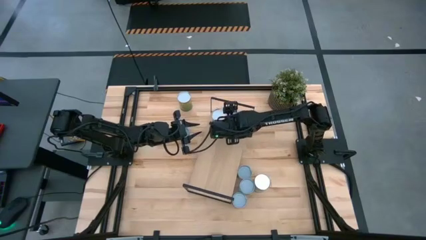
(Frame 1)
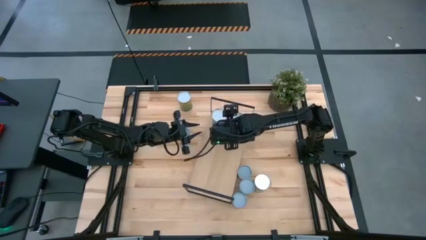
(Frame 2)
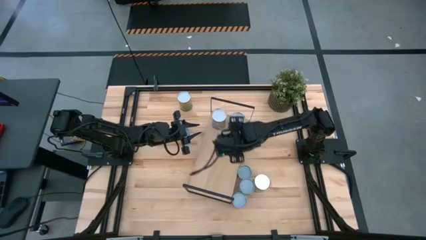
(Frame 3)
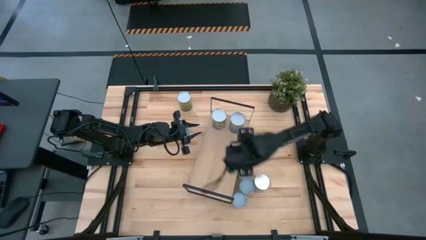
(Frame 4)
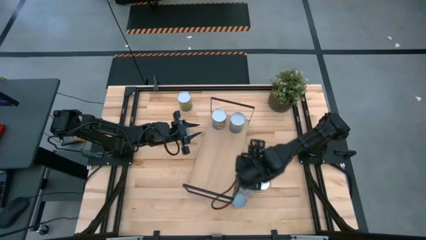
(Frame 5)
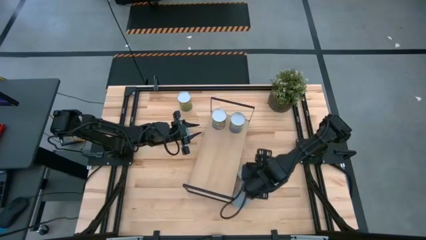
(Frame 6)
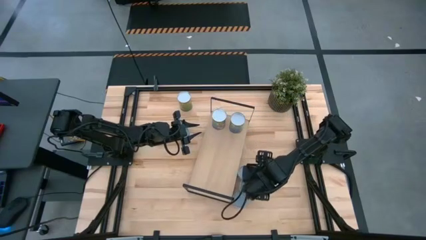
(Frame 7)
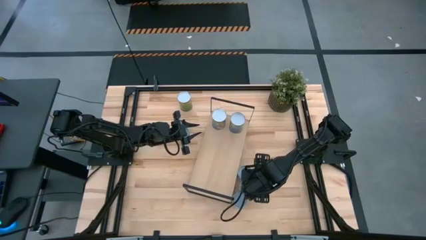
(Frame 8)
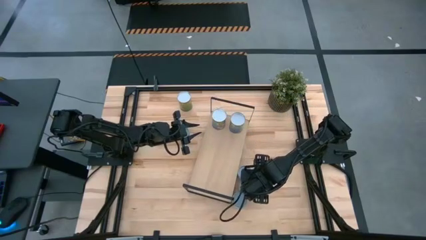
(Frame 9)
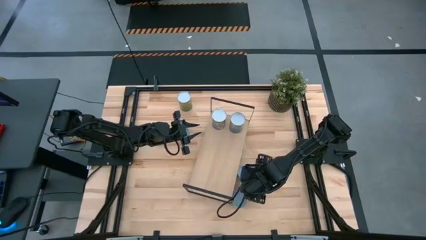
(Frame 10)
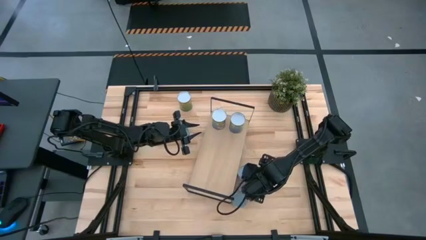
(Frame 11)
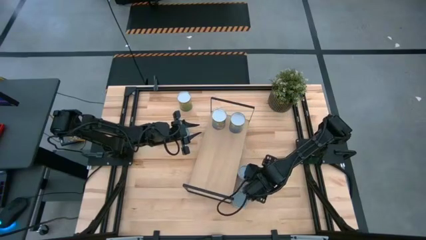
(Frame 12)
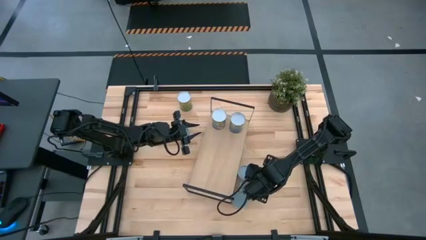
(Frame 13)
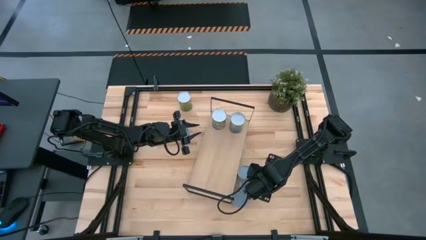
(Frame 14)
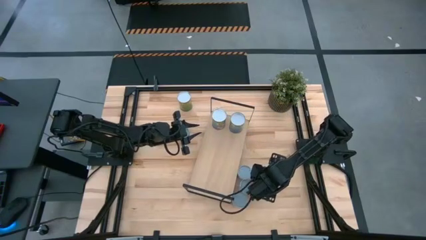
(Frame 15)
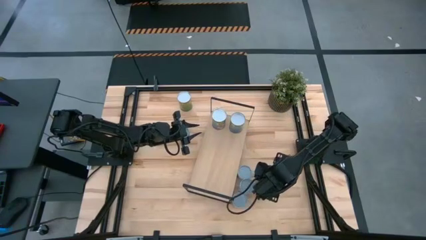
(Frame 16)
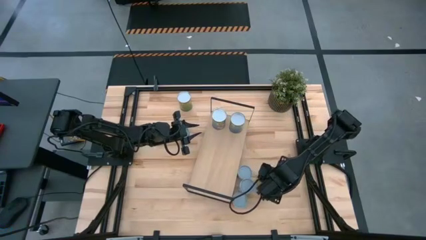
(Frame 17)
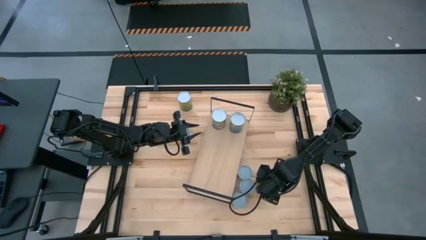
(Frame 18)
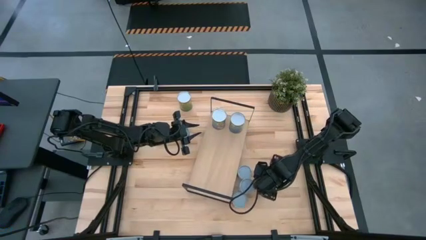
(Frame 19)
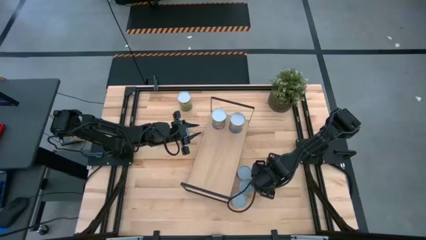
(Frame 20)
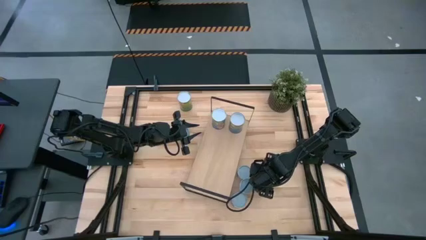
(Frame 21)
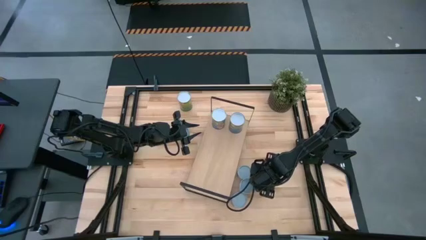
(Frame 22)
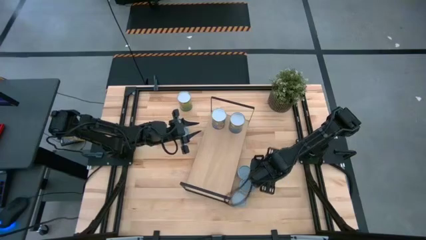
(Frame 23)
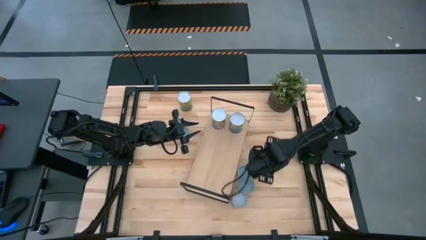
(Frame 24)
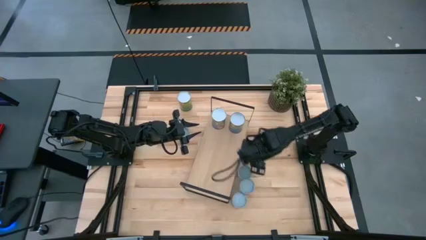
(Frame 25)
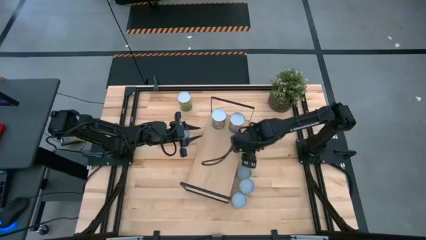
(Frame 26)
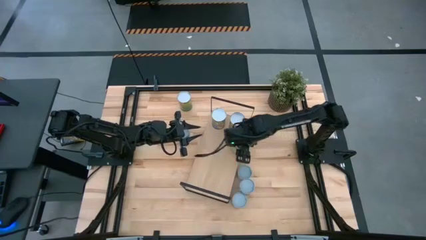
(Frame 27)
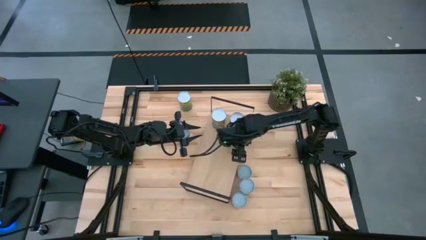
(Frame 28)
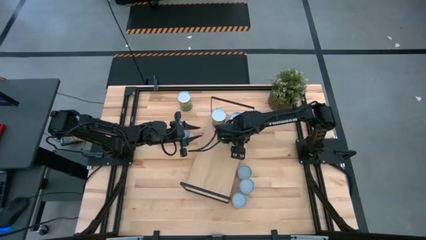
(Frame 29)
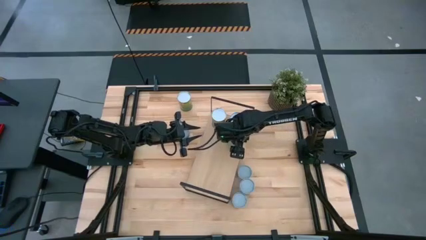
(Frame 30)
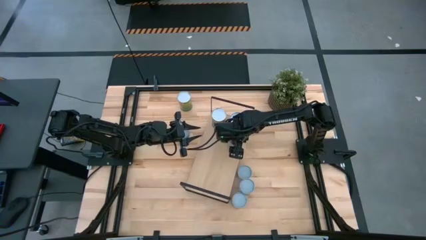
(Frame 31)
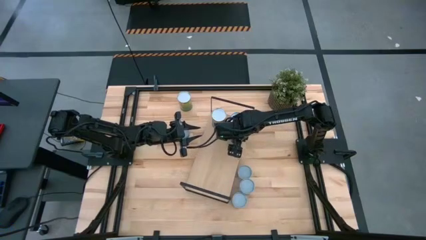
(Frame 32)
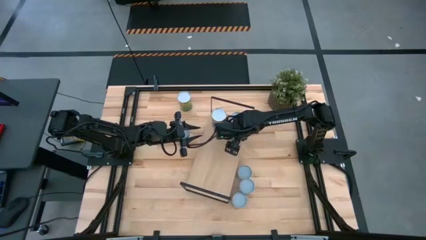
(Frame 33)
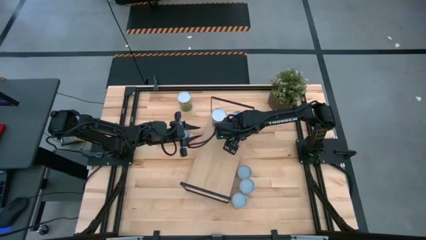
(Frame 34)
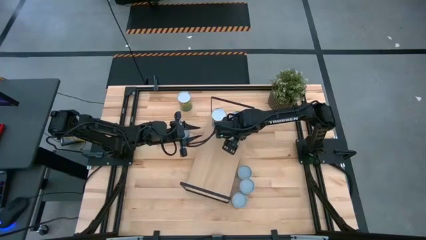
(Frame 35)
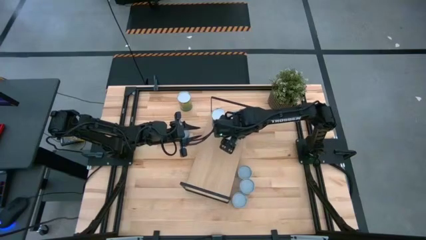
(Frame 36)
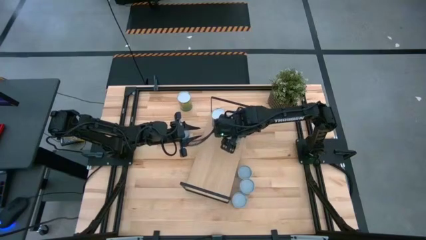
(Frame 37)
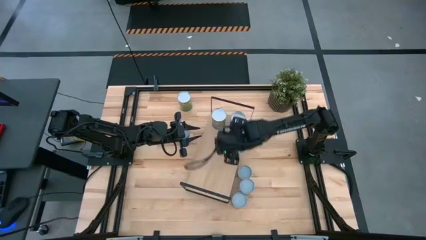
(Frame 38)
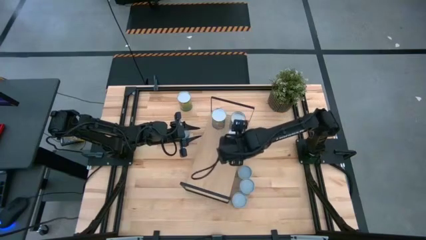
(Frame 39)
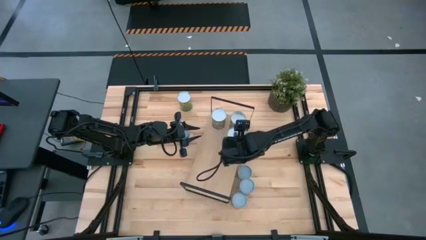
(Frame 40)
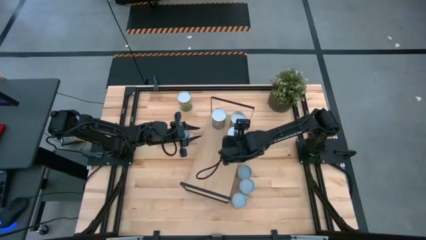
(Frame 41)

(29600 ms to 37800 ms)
Task: Pick and place cans onto a shelf
Put the canned carrots on the shelf

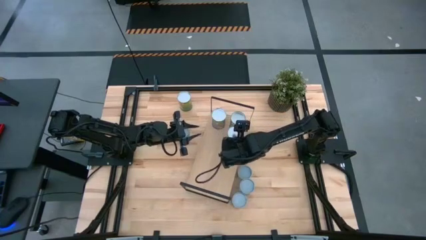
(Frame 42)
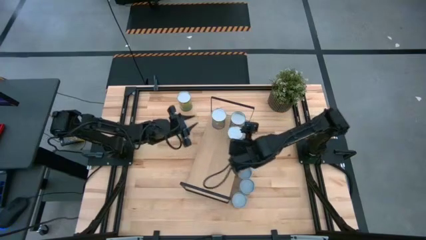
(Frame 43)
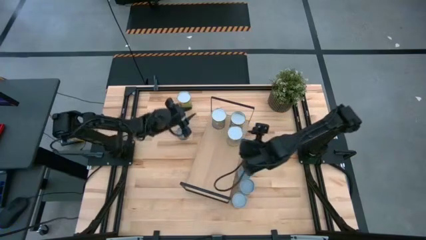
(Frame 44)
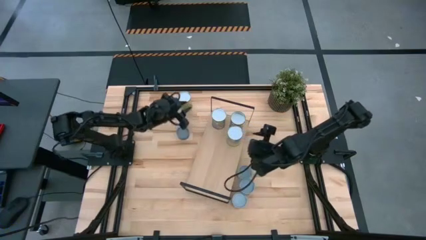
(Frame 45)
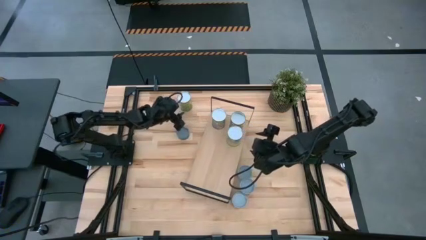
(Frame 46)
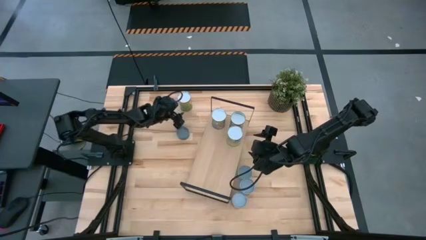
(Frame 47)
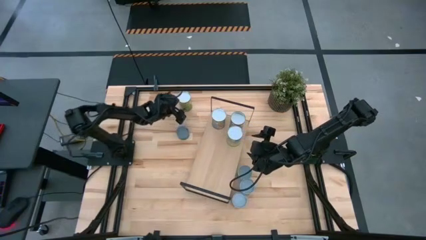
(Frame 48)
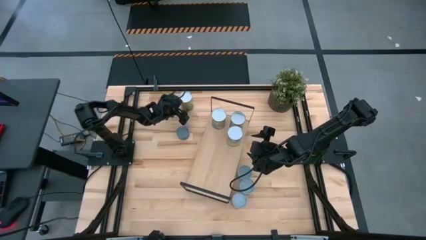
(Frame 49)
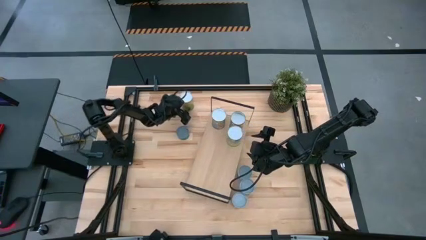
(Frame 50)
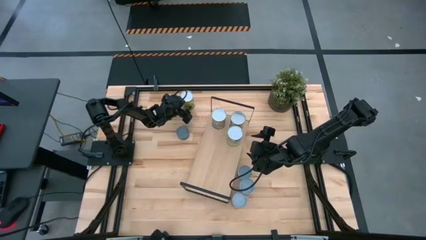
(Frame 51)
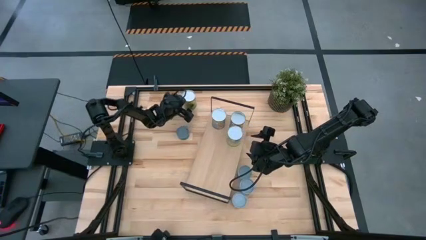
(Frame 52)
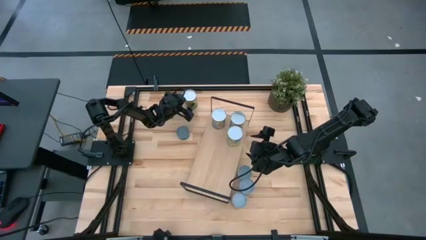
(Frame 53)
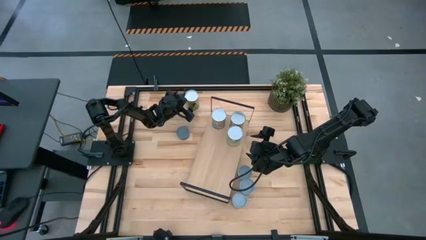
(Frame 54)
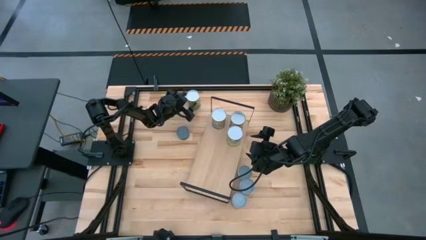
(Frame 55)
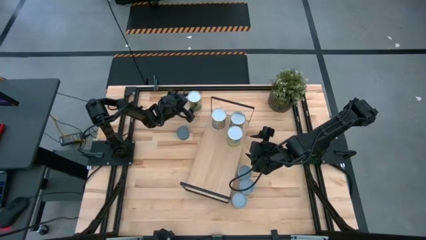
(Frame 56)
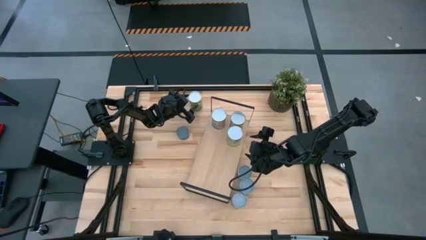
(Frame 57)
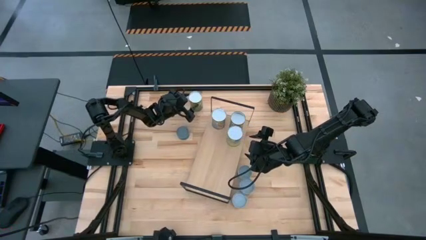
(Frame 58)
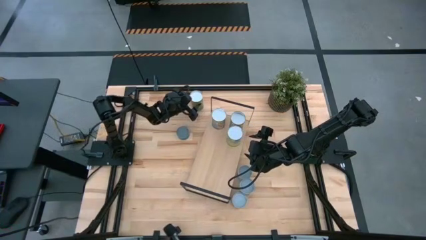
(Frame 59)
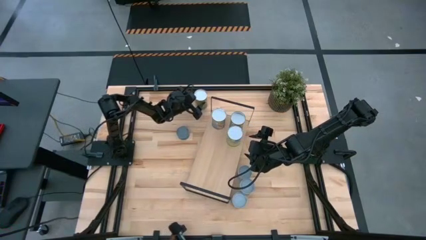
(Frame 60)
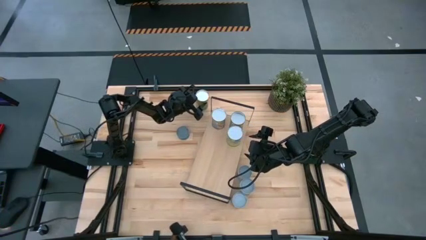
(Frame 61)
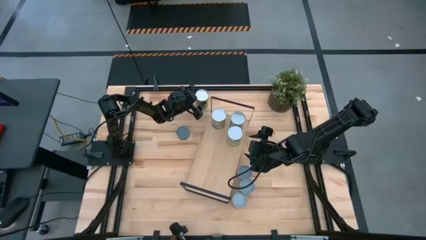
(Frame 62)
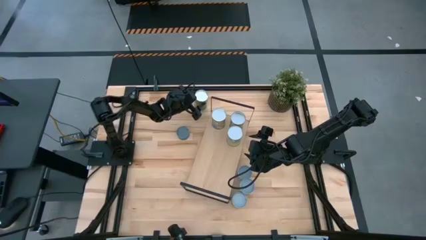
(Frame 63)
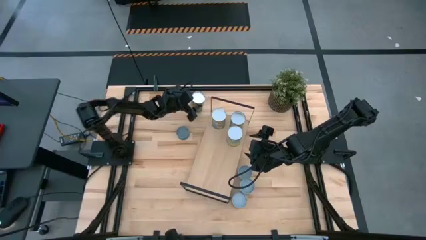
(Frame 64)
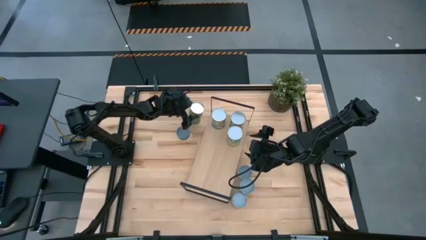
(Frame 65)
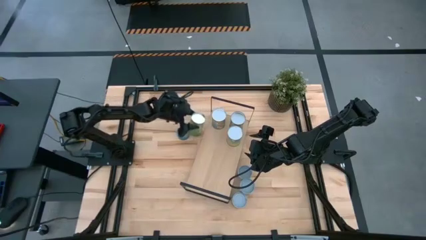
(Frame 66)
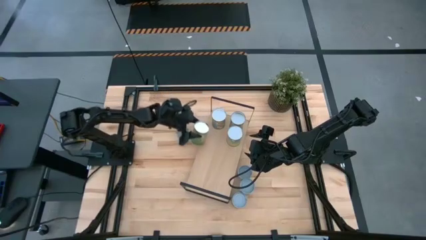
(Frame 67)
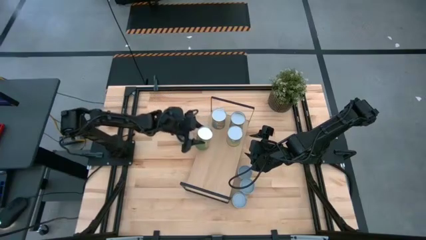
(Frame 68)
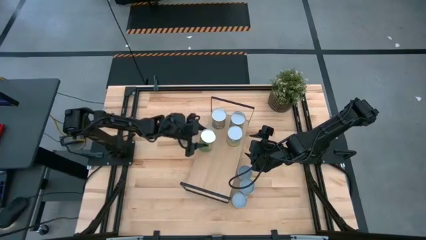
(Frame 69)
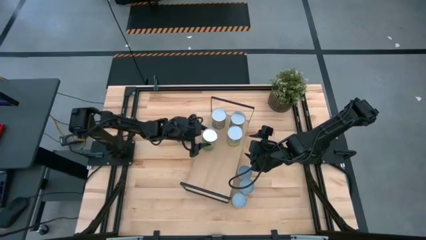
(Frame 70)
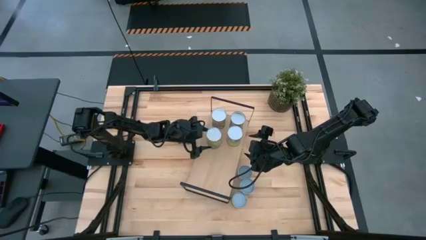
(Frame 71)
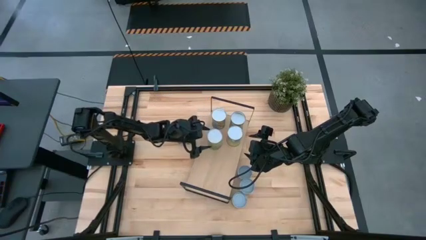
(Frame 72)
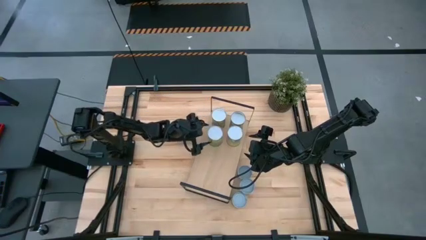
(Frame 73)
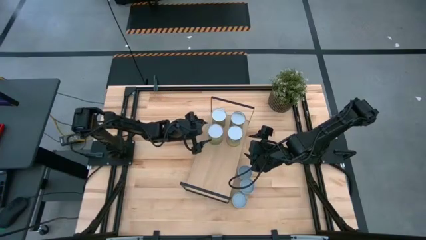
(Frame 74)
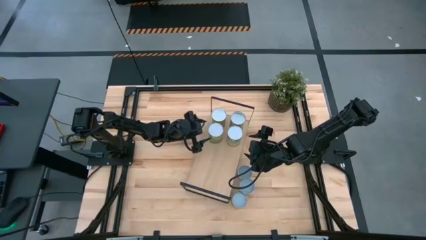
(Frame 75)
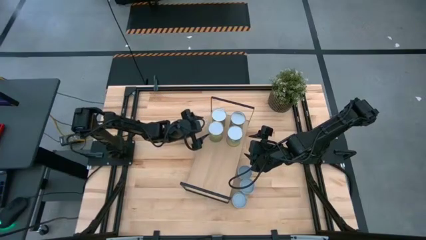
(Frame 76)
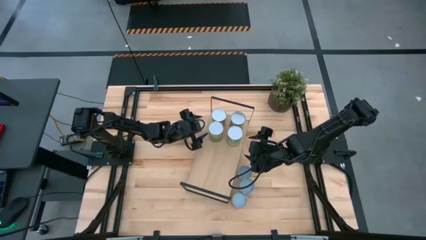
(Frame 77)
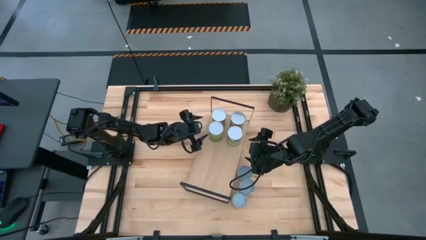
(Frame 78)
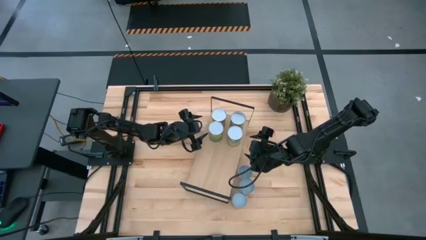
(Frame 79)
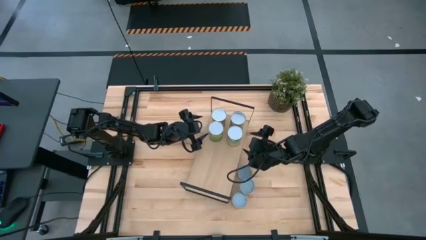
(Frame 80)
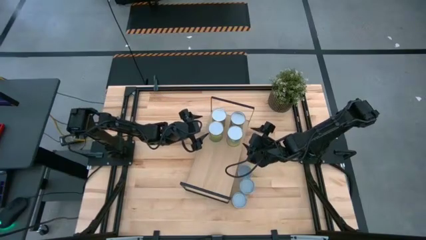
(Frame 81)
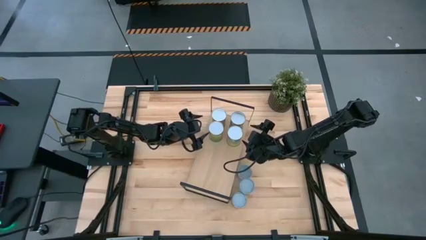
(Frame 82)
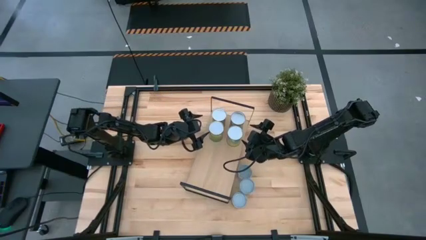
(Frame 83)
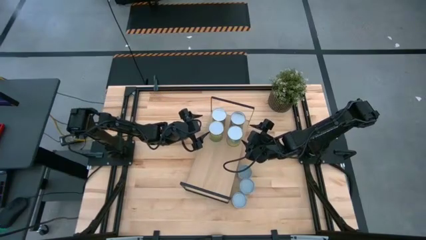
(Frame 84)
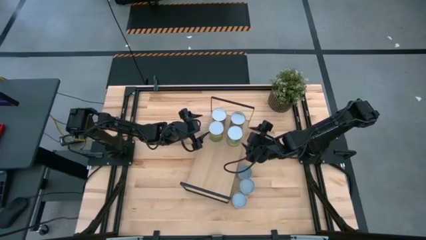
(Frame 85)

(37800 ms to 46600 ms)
Put the canned oranges on the shelf

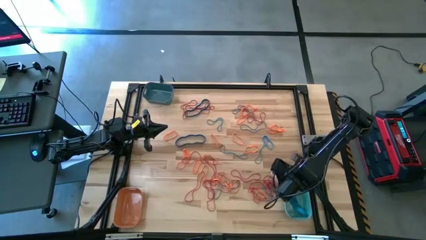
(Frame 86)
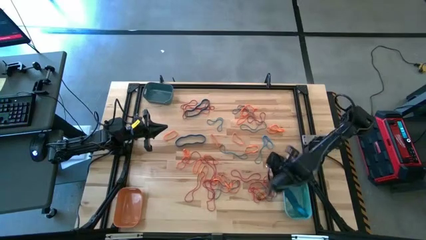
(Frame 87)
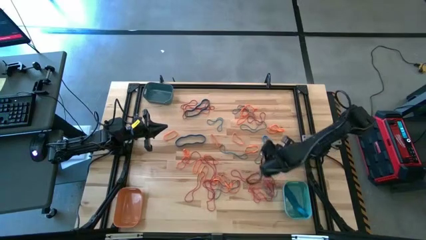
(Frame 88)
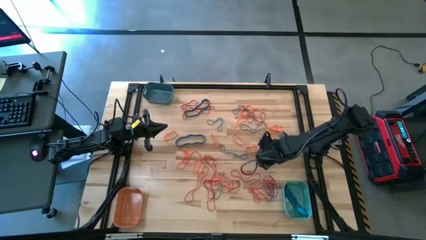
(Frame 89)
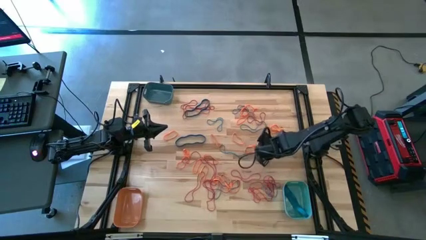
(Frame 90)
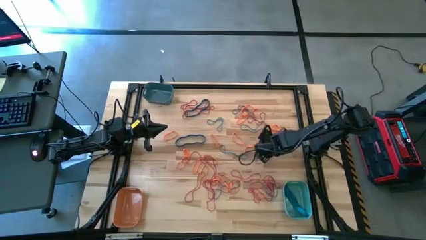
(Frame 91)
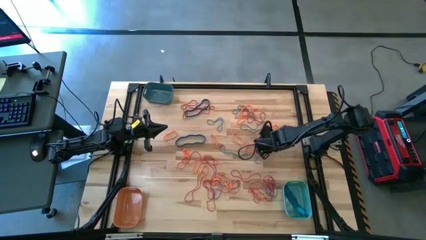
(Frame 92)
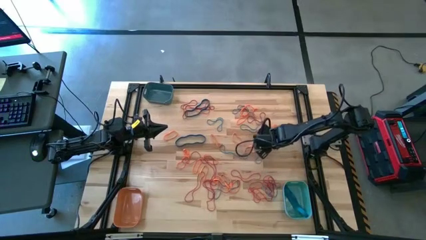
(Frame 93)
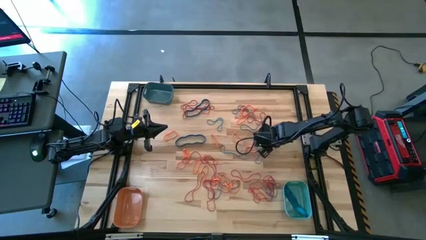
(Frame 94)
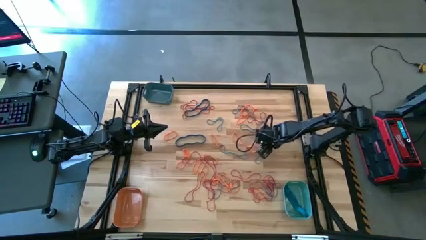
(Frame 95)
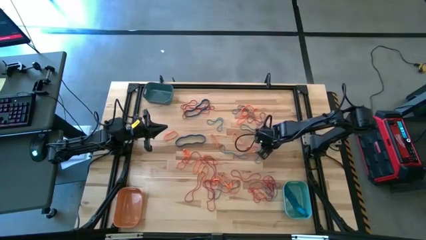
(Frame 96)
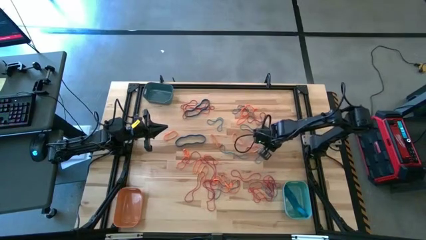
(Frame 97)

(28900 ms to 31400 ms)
Task: Sort rubber bands into baskets
Put the blue rubber band into the light blue bin
